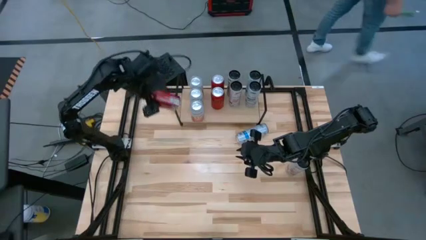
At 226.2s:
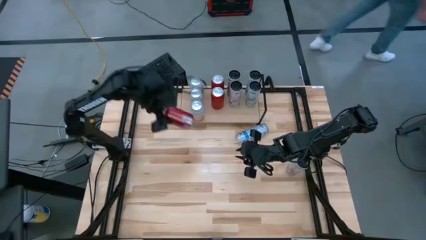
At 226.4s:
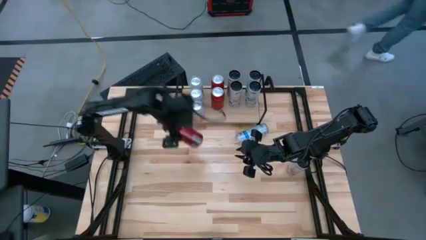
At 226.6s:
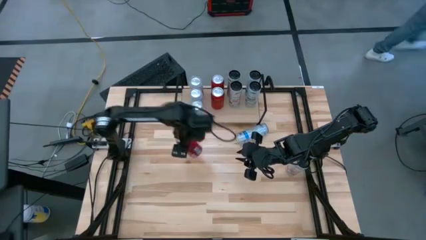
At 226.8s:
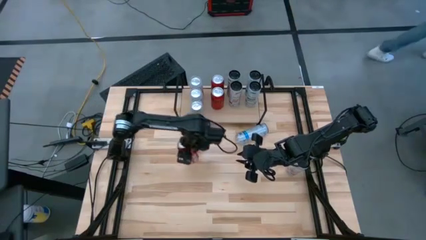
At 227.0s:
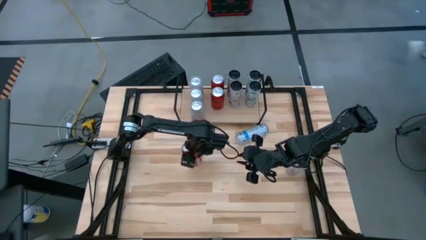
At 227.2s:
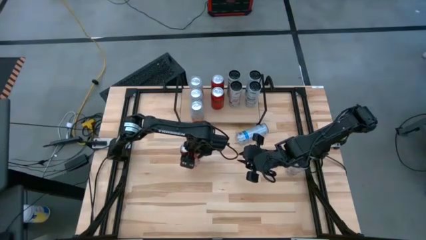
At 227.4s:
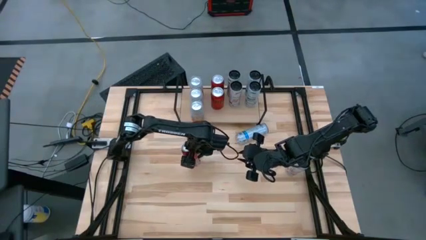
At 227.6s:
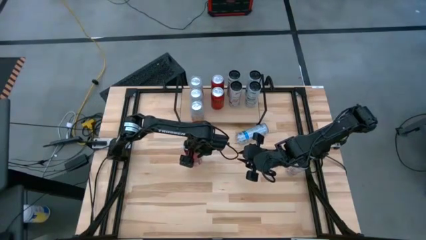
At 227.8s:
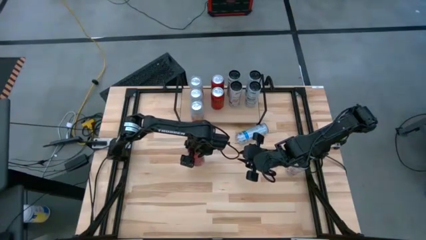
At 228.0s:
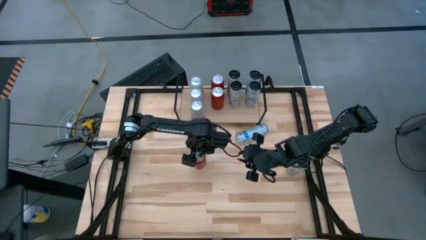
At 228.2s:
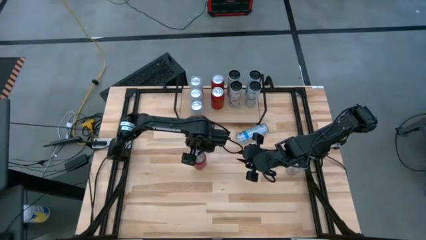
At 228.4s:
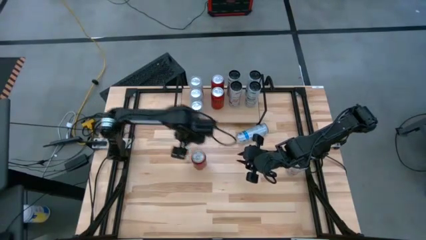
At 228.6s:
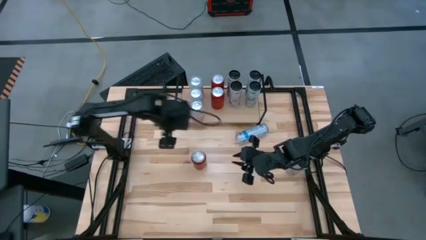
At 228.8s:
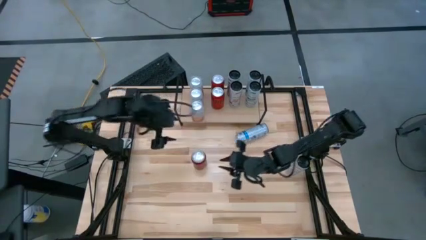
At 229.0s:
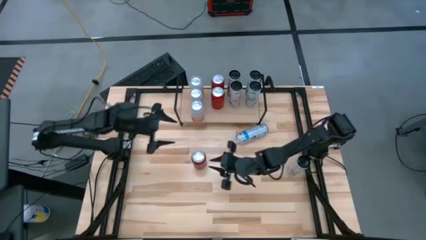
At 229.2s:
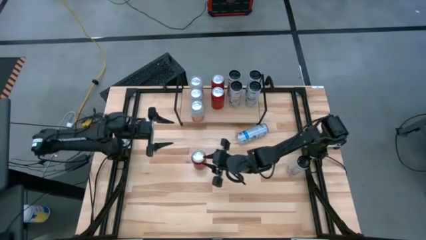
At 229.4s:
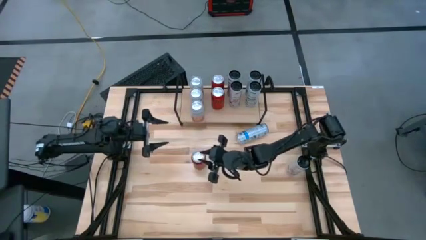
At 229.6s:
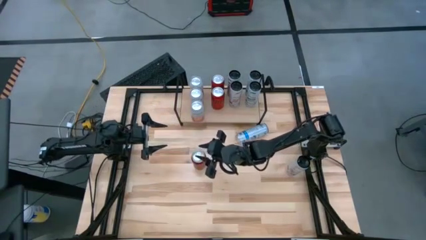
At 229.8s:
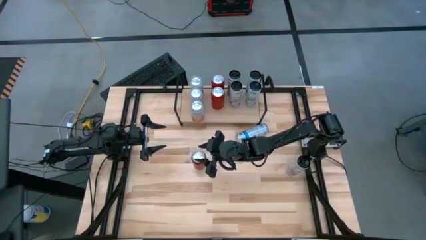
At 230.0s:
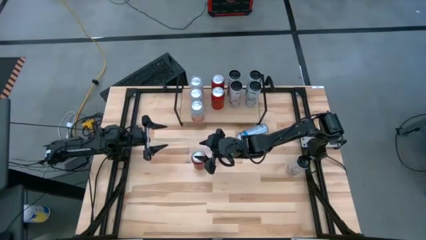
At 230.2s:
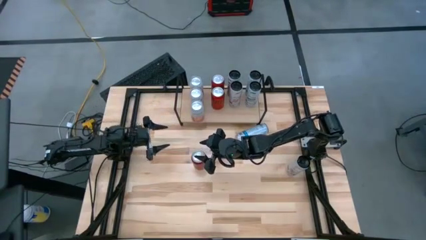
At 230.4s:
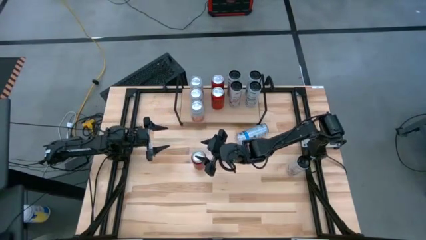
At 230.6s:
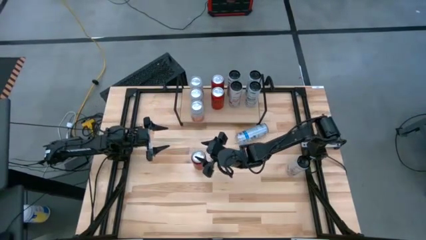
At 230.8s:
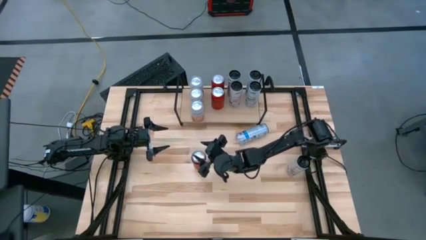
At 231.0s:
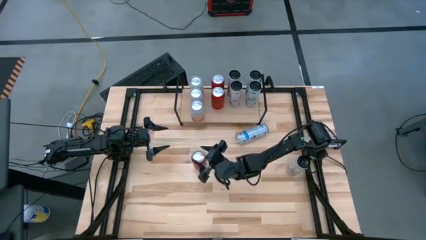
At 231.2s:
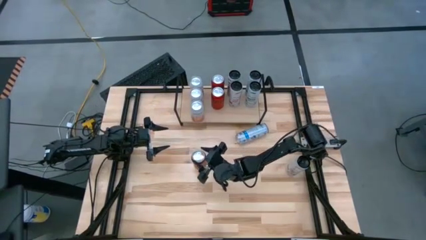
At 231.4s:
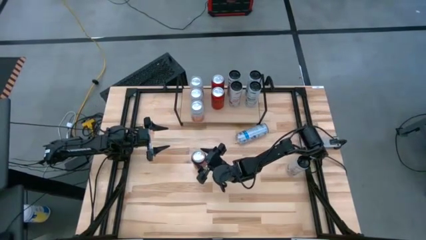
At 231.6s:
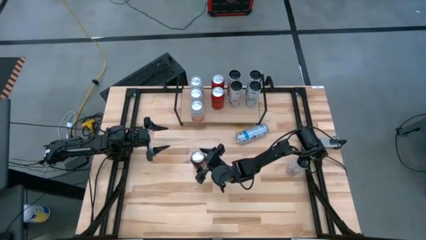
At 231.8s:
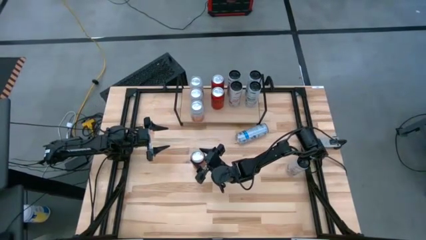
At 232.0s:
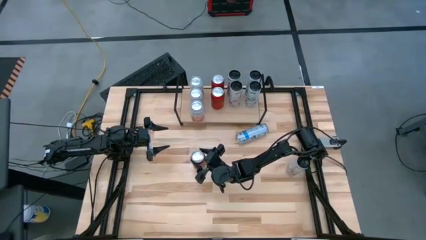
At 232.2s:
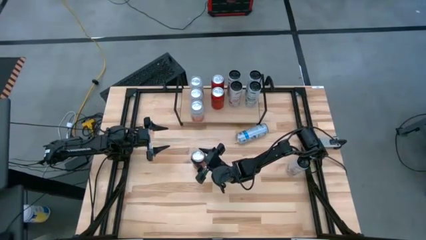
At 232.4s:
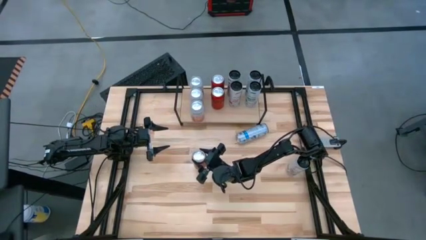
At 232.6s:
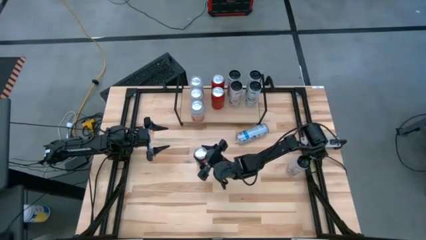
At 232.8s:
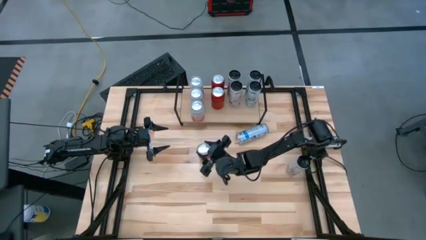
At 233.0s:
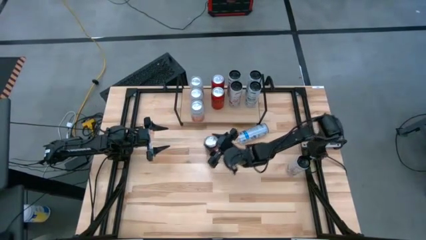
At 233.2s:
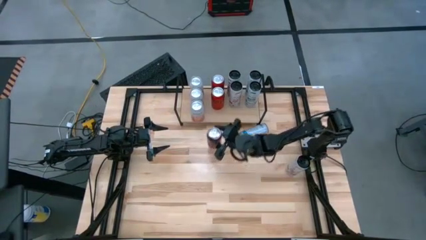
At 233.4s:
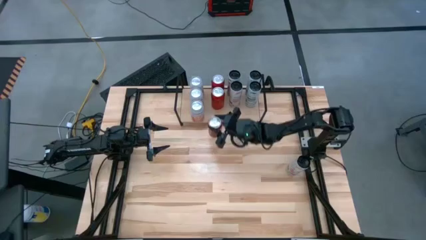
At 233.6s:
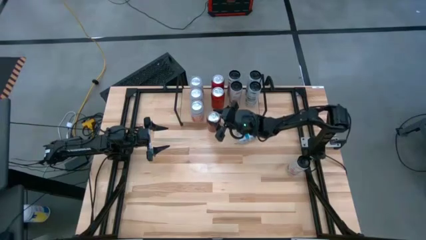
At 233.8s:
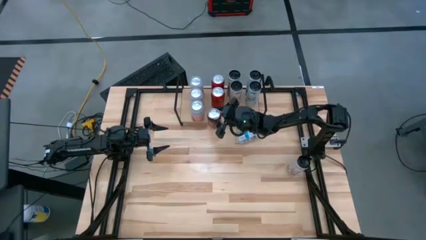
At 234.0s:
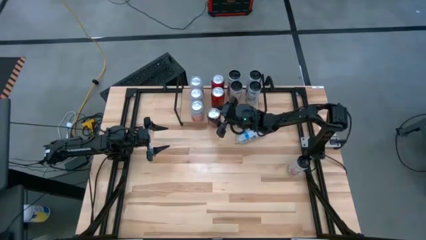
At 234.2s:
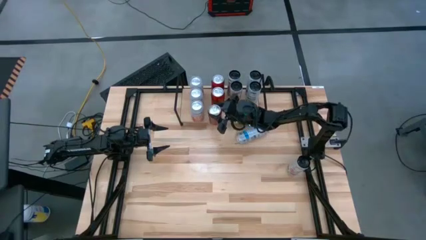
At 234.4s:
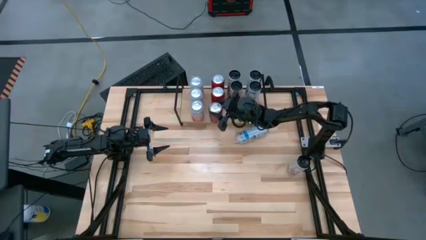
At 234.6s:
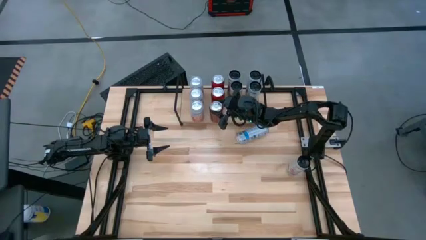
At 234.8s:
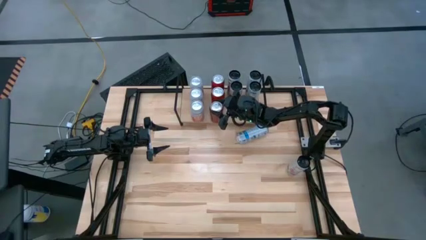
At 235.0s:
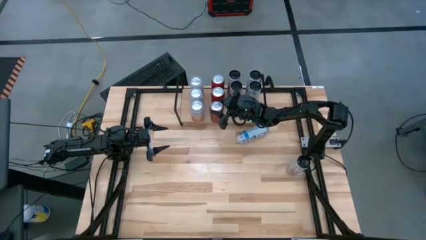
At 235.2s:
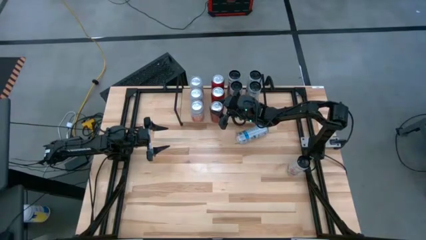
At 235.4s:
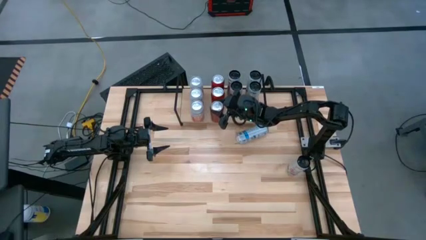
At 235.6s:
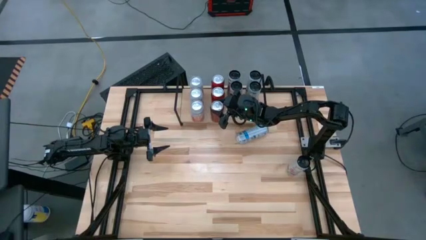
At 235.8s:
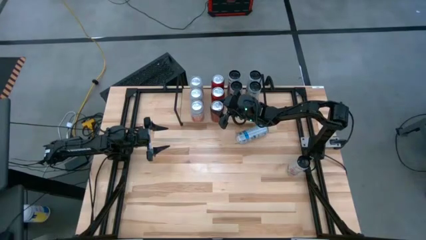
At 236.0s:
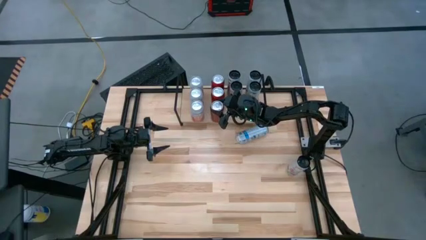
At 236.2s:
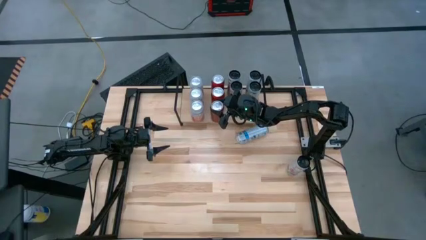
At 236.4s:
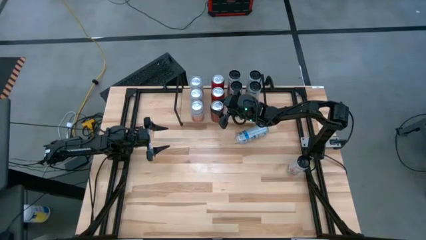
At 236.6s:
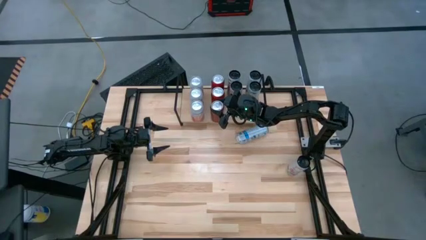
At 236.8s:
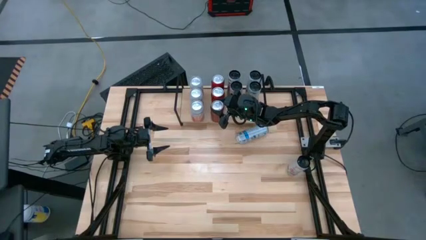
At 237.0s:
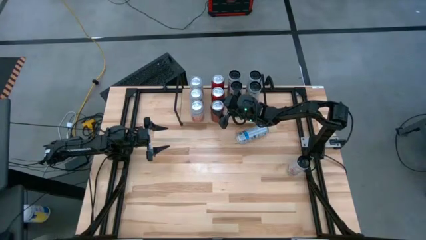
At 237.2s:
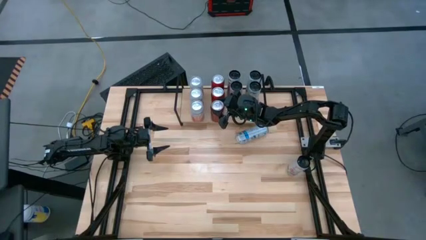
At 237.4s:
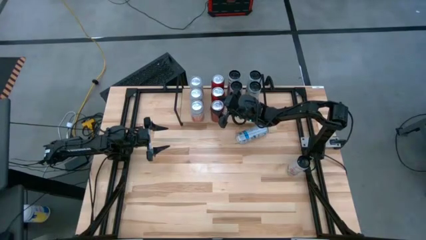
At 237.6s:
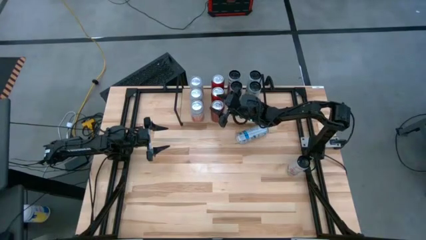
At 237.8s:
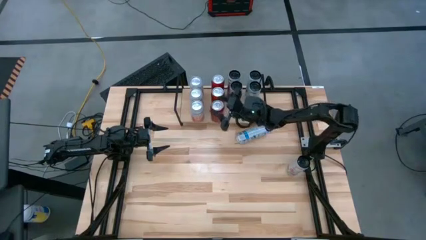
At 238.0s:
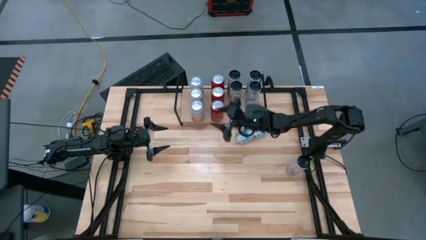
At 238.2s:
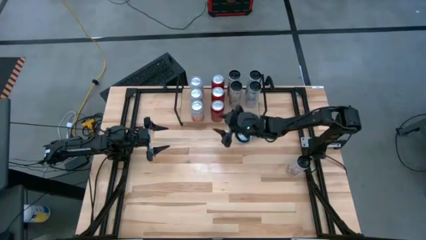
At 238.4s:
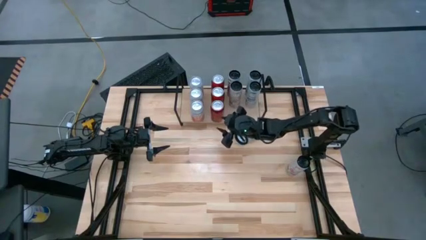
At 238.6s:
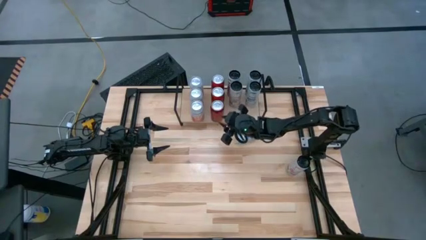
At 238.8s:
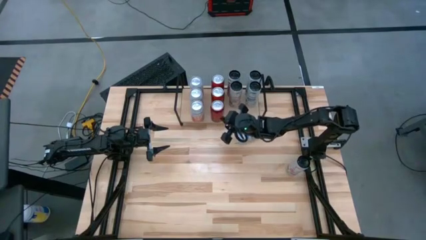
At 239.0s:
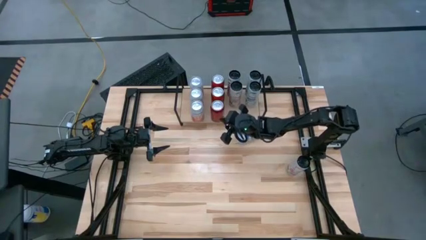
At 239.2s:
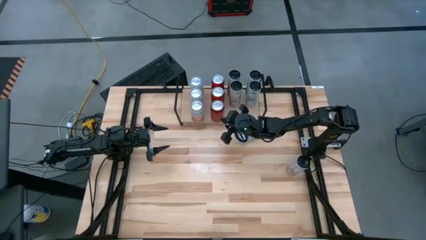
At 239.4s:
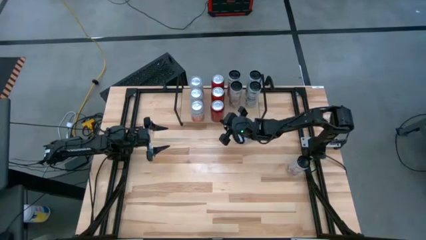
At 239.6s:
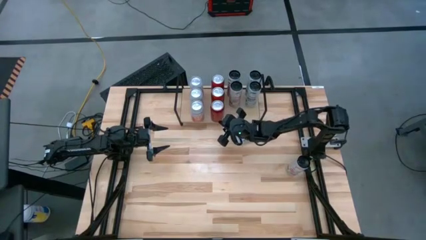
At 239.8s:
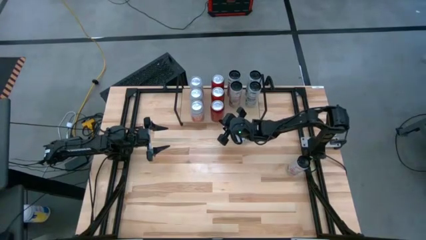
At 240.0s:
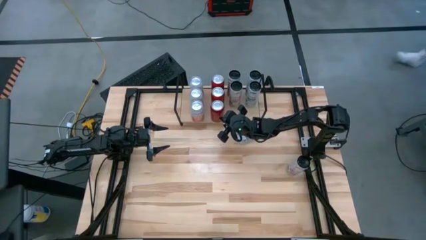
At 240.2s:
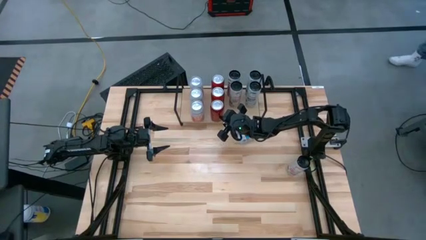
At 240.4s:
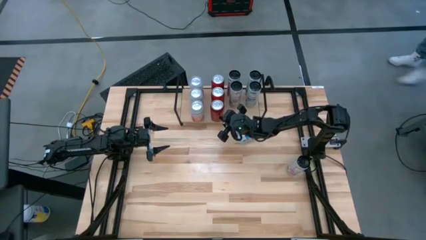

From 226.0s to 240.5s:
Task: Place canned beverage on shelf
Put the red black soda can on the shelf aligned with the other red black soda cans

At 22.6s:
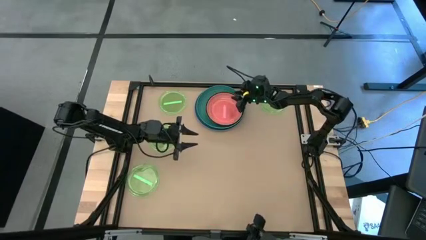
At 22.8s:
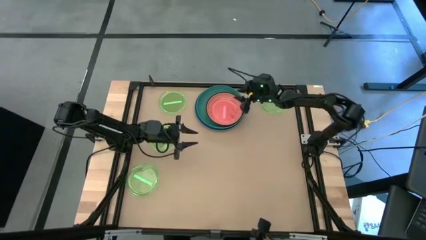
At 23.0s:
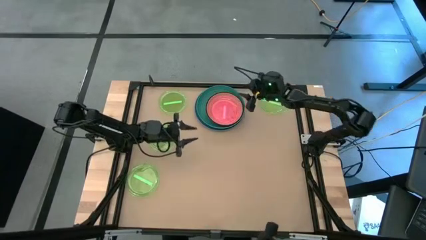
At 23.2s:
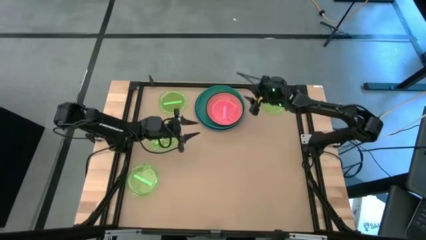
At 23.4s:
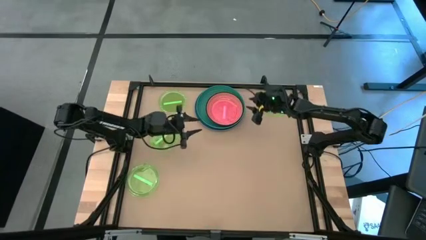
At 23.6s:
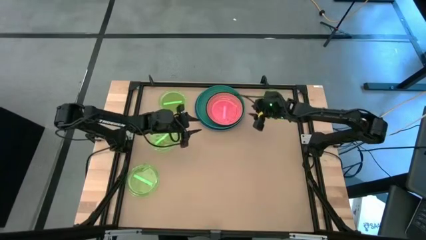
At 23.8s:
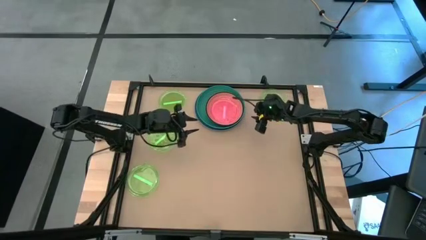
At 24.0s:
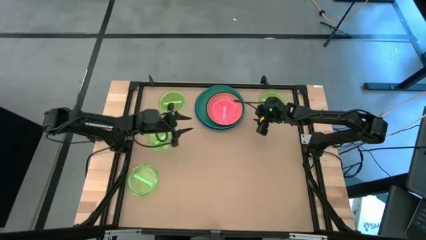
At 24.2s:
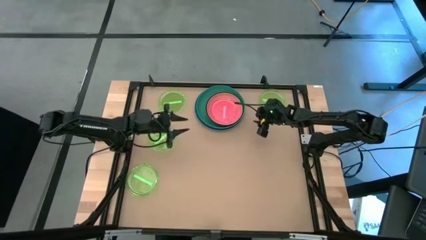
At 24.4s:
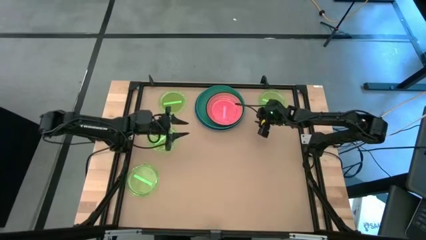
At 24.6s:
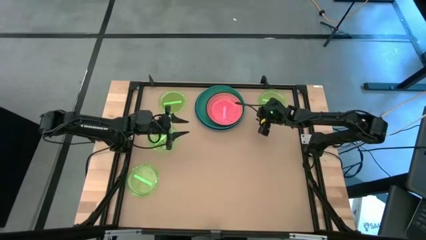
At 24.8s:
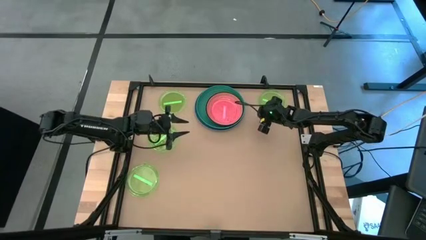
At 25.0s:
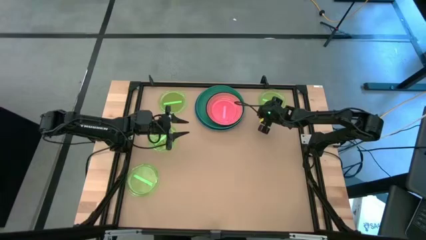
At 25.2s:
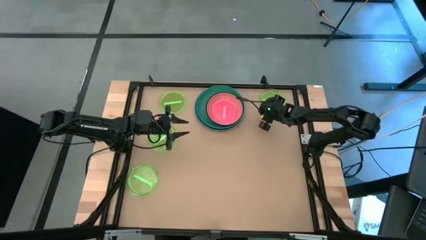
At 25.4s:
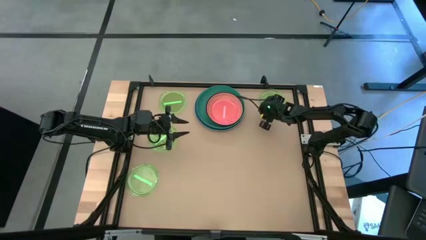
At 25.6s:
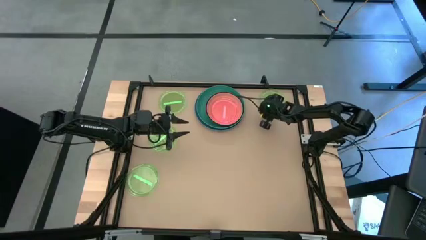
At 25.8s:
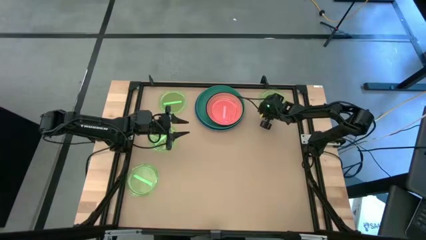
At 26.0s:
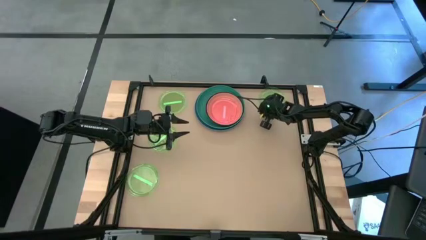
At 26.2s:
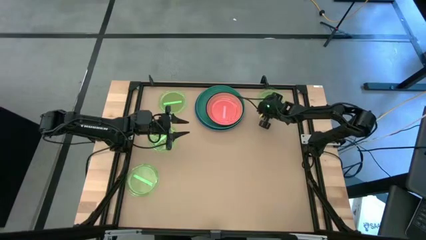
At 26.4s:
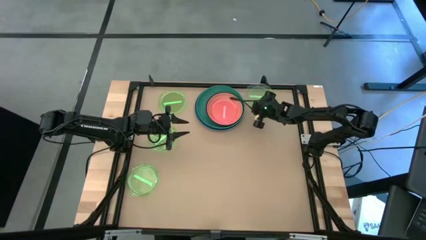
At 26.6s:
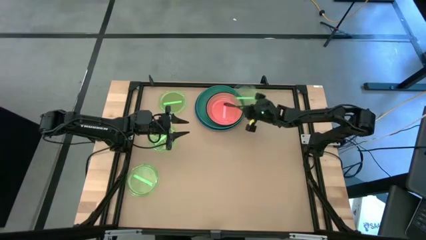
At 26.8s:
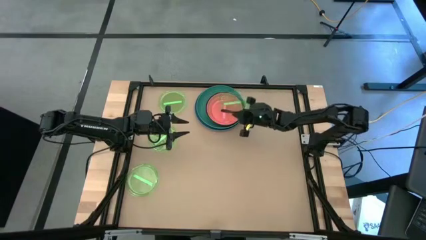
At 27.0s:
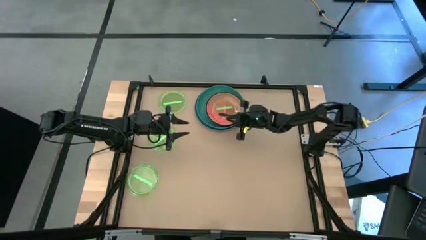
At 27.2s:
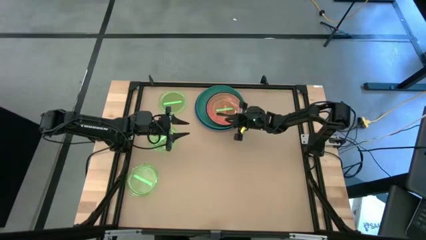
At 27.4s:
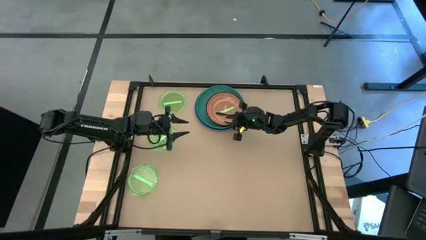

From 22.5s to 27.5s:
Task: Stack plastic plates
Stack the green transparent plate on top of the pink transparent plate
